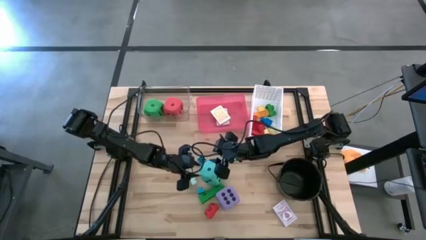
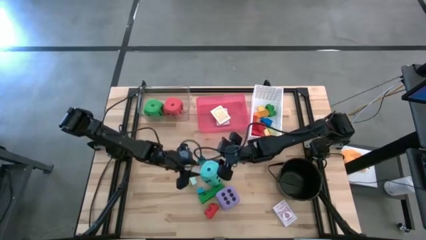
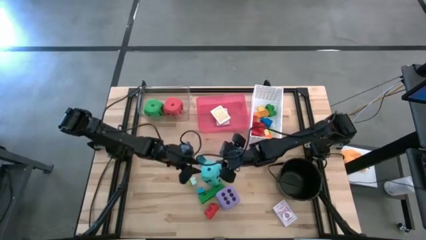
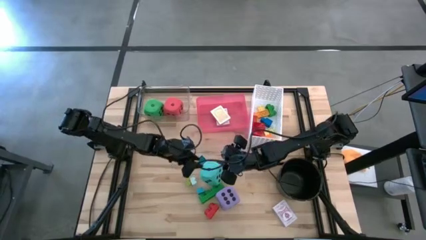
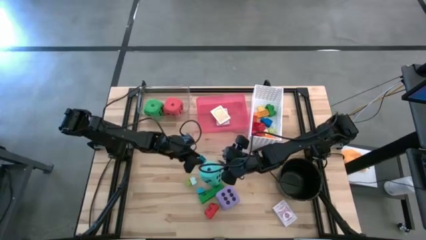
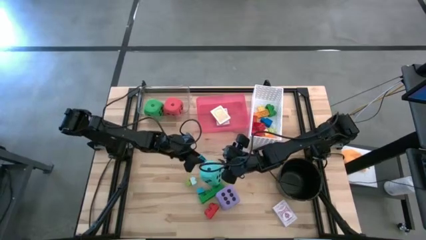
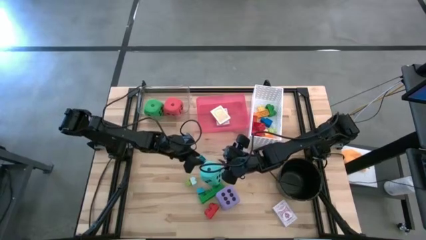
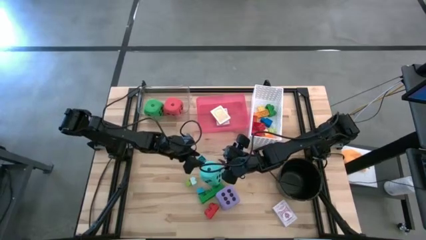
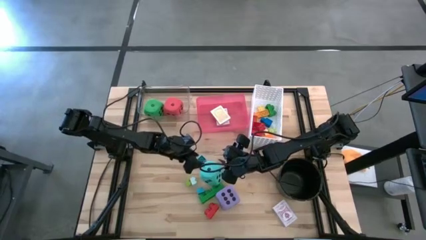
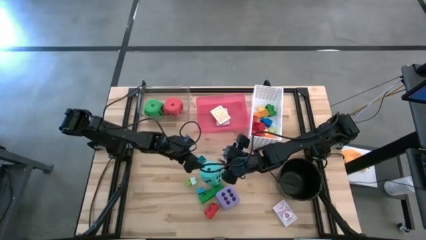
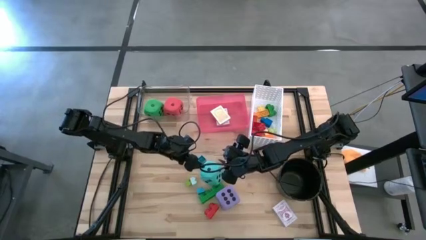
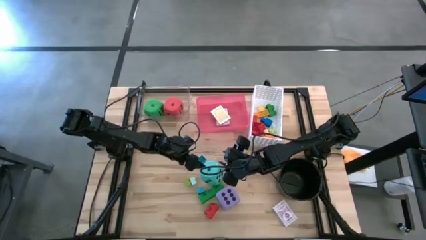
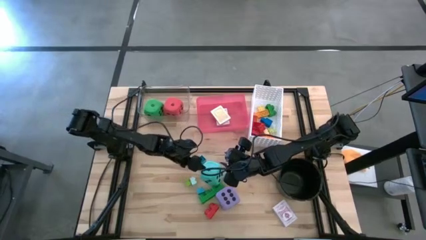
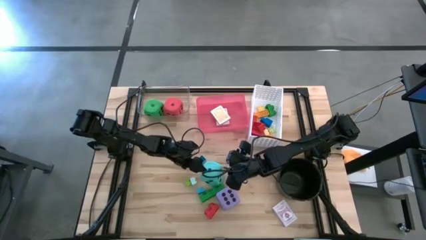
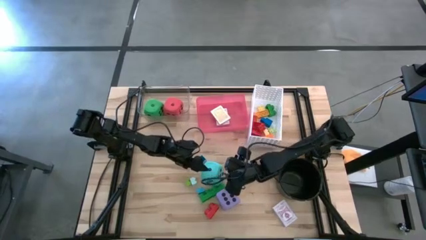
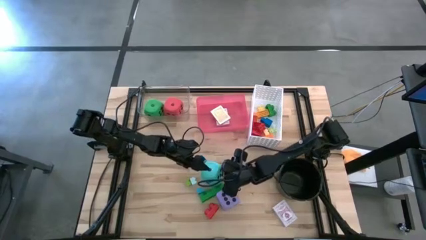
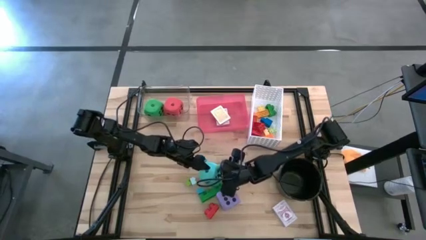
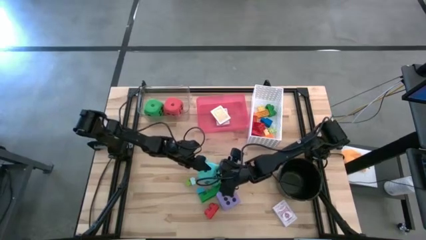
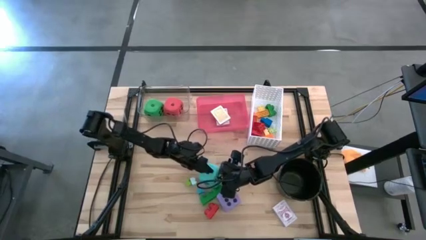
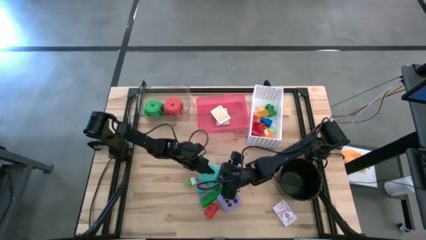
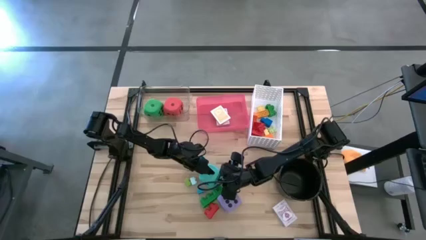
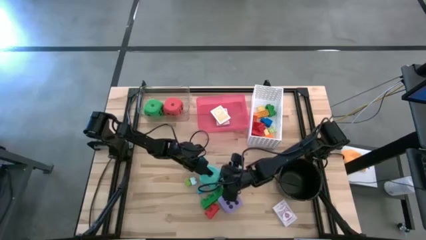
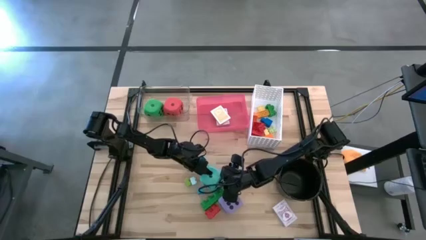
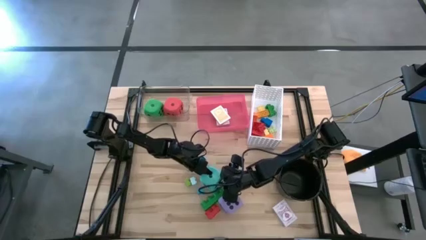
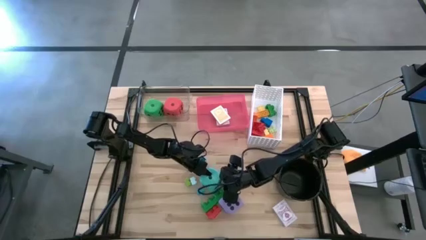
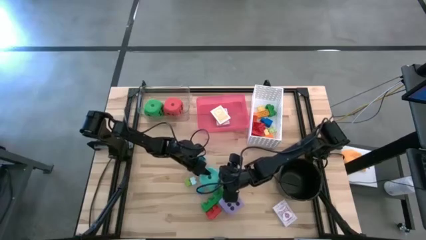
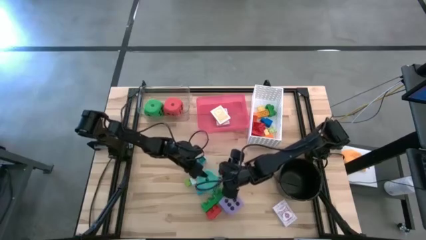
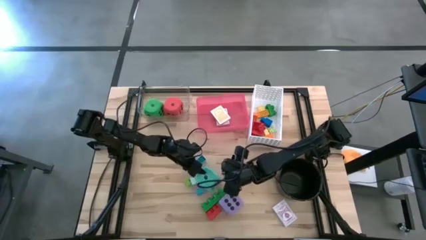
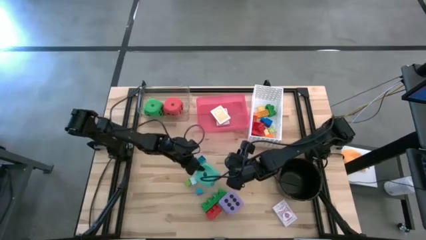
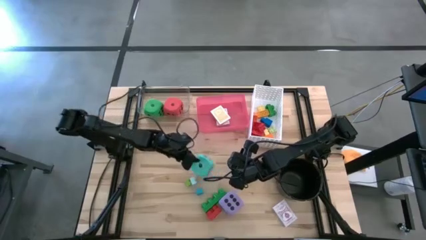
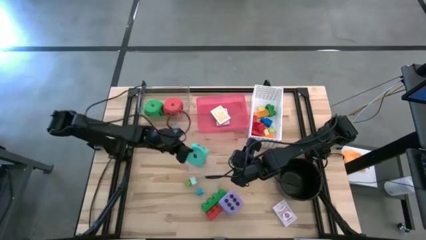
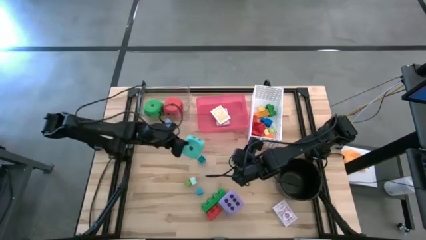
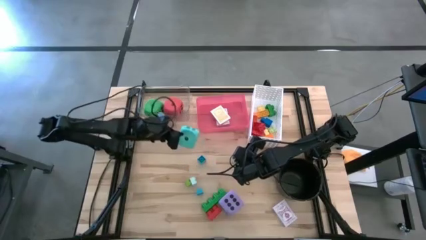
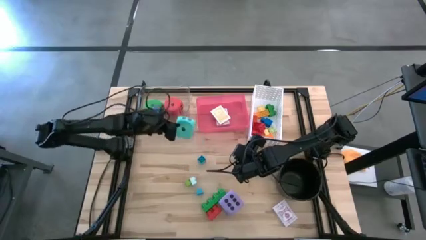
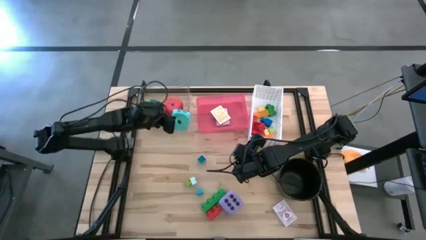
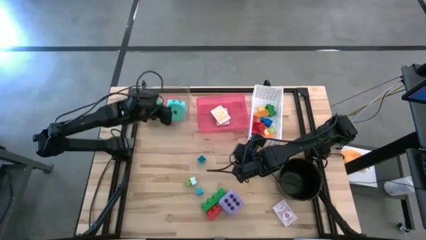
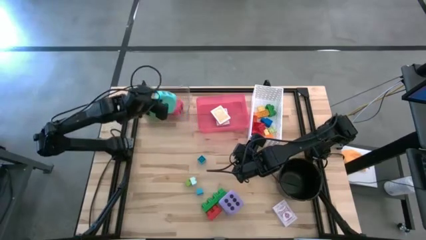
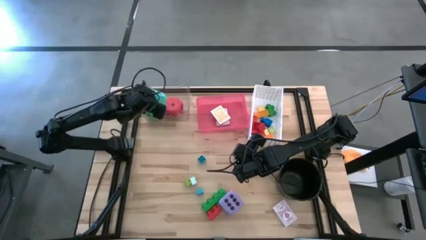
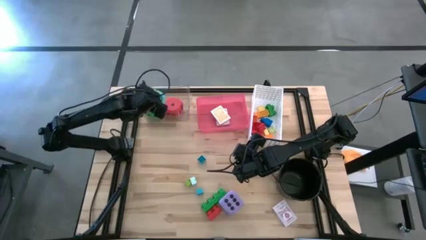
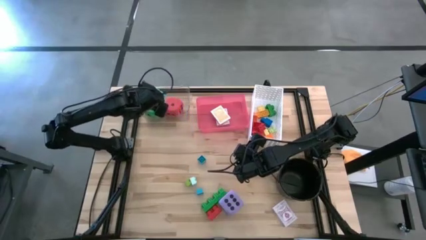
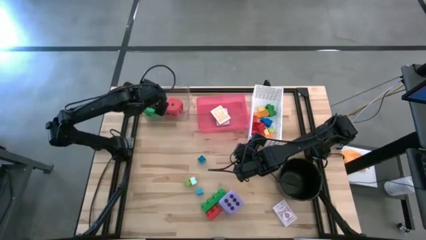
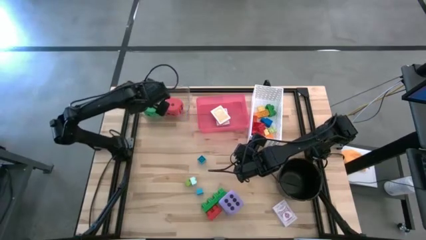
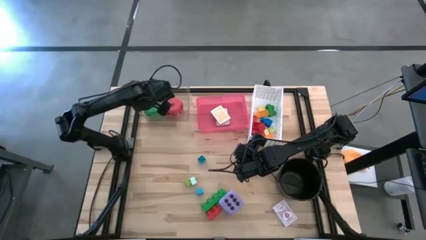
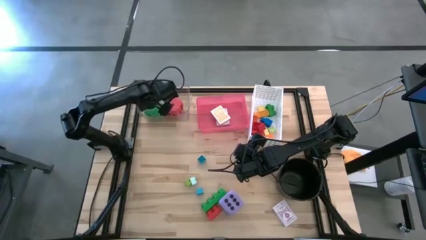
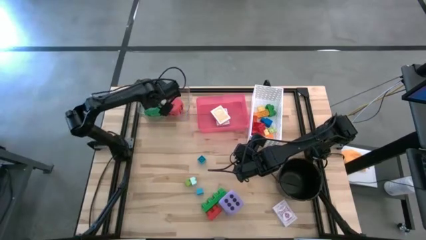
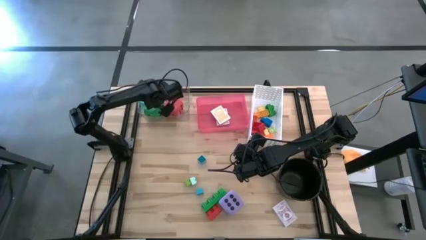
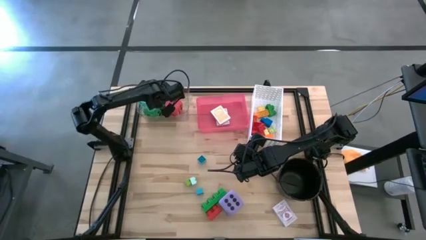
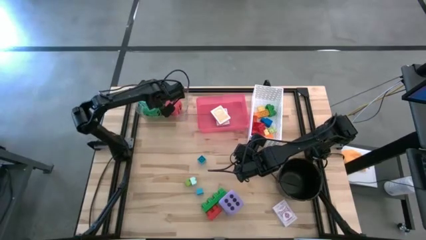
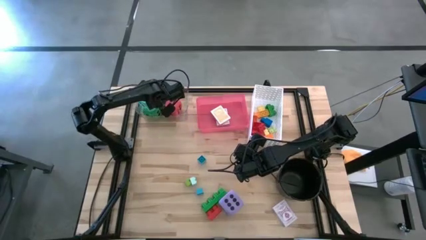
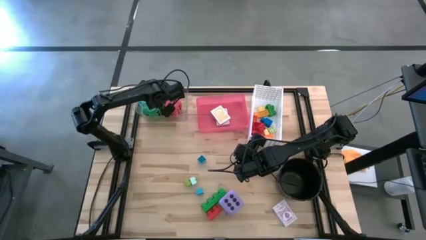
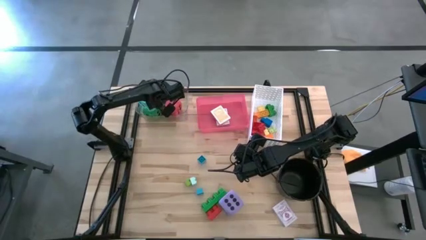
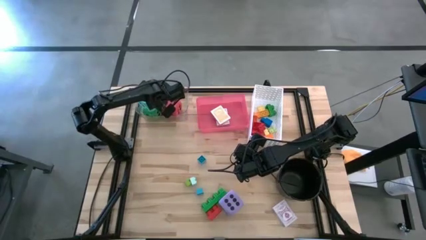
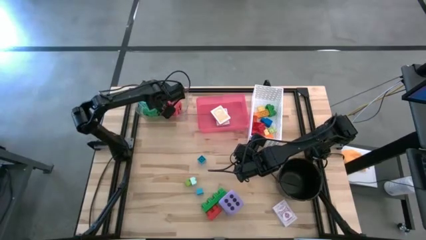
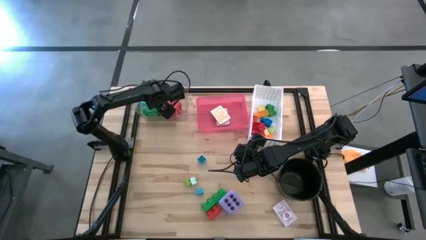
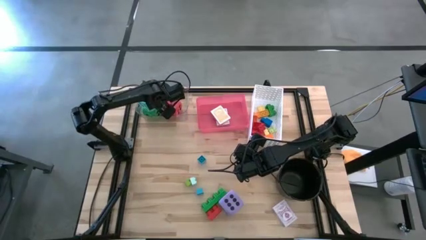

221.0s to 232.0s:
Task: Pick & Place Toys
Put the blue die into the transparent bin

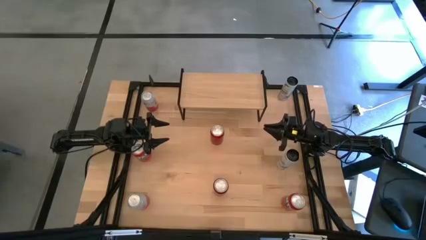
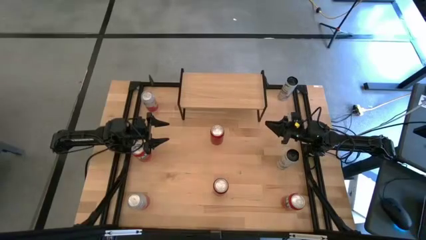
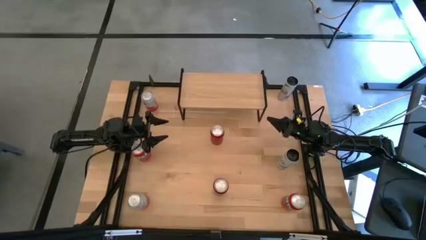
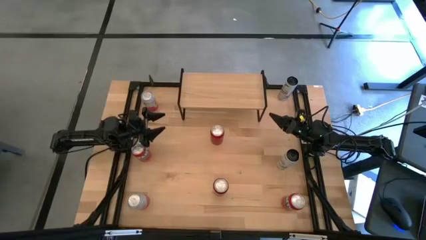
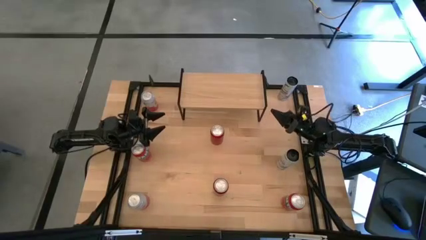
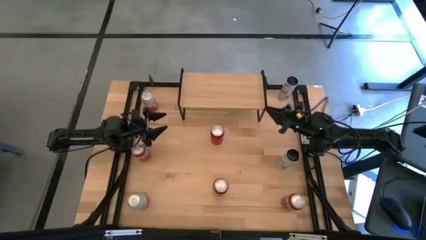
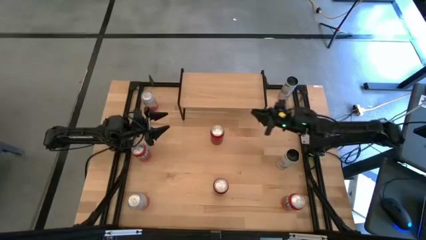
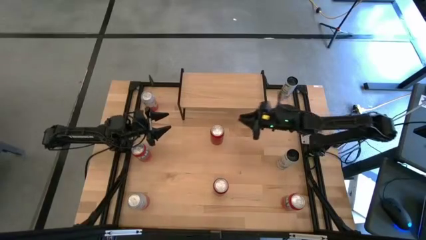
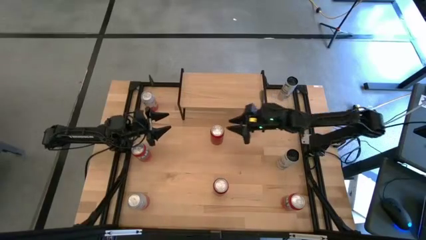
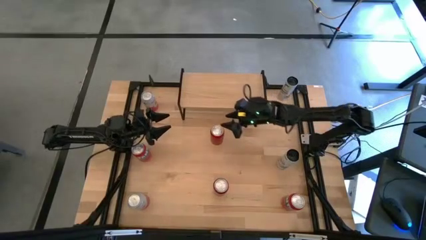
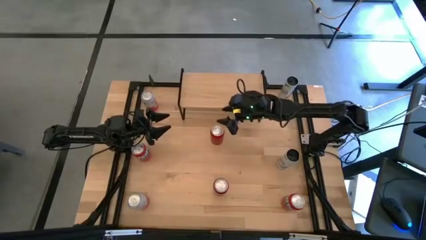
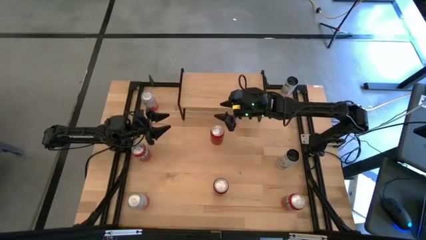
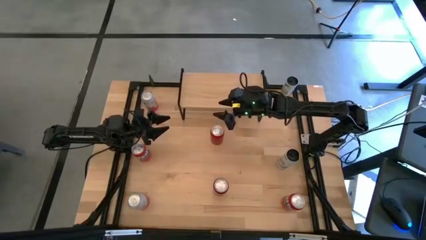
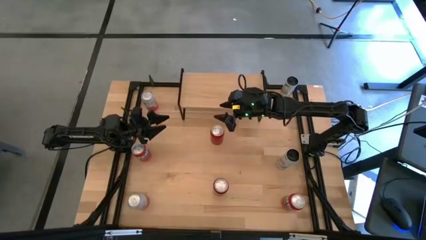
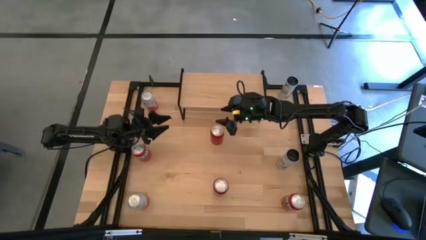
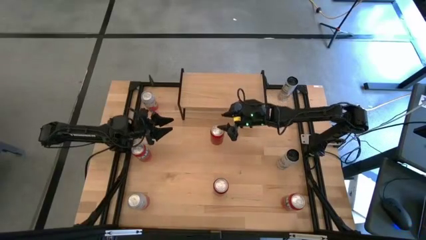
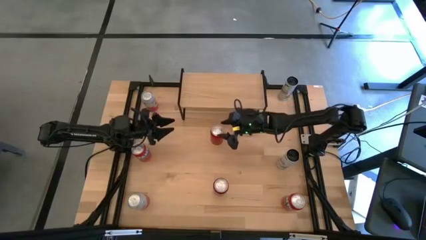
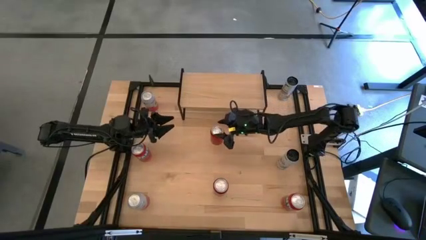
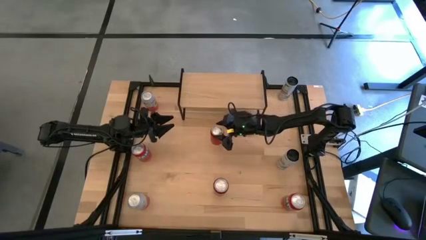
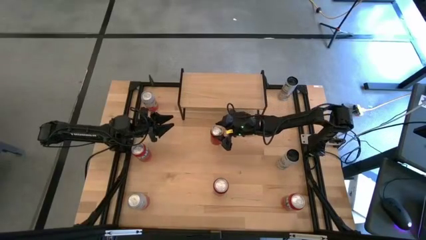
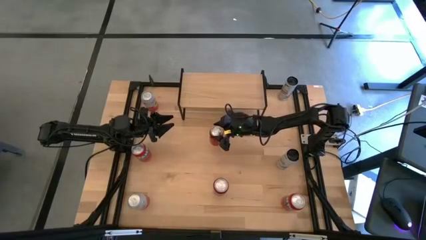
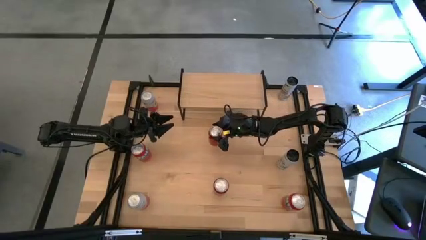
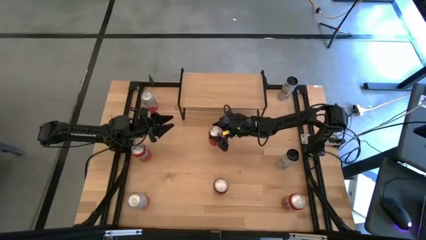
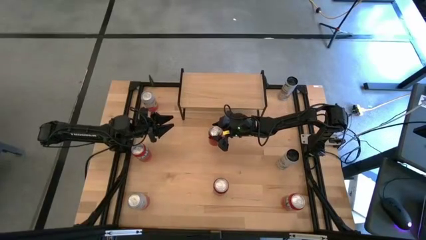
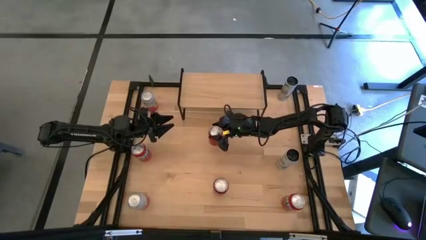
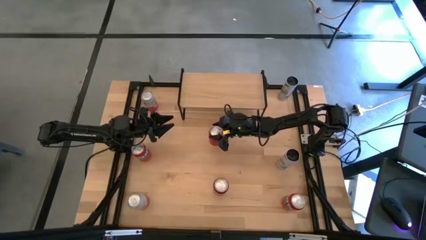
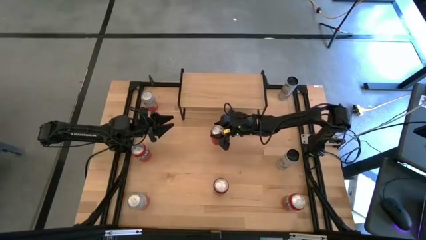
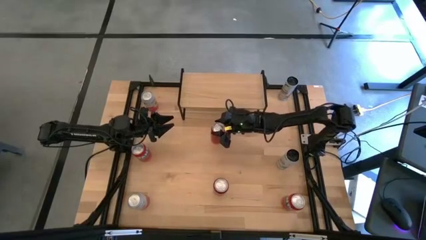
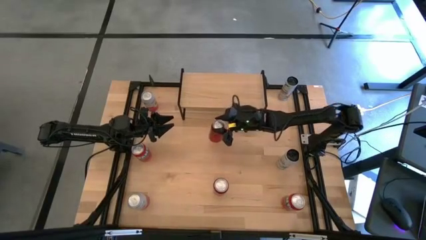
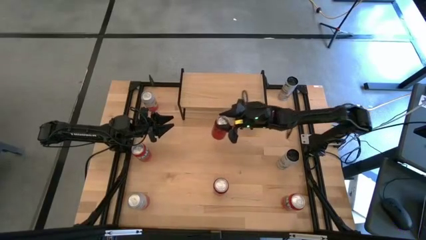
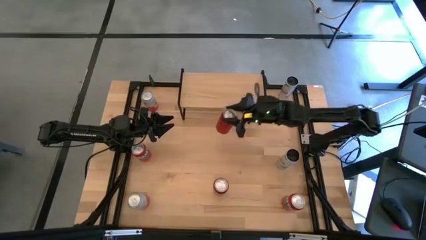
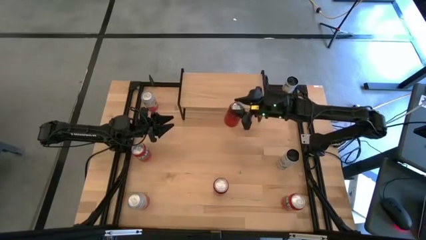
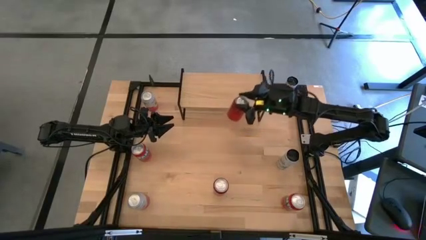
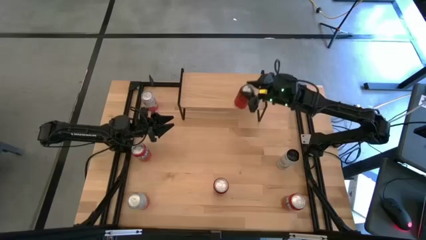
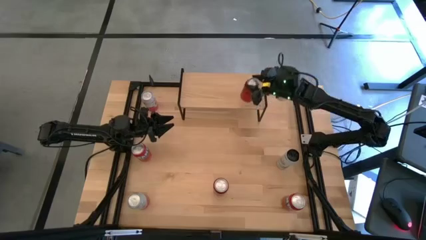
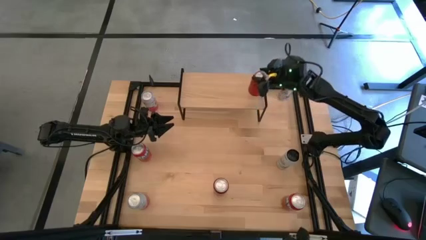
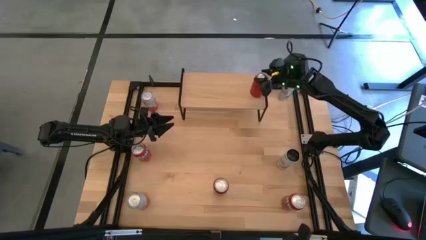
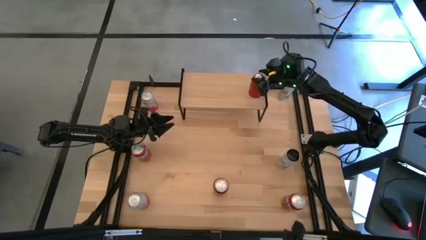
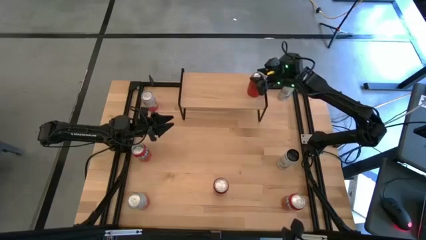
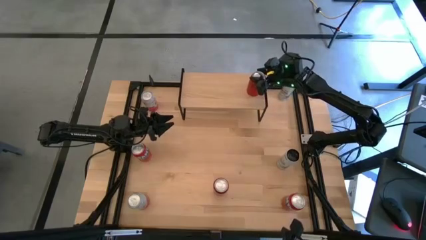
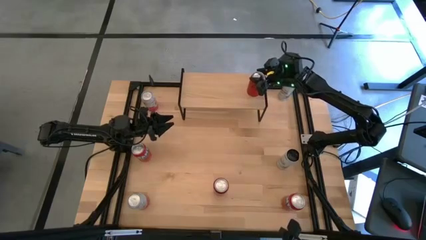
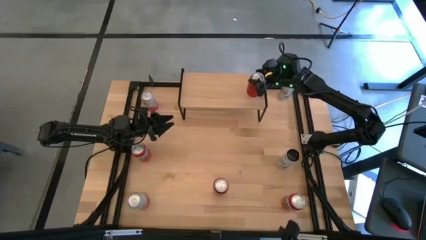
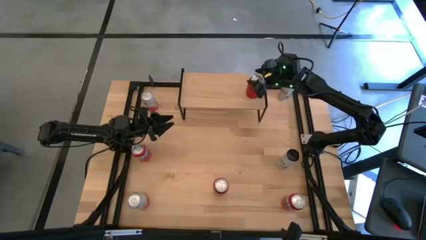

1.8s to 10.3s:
Task: Place canned beverage on shelf
Put the top red soda can on the shelf
